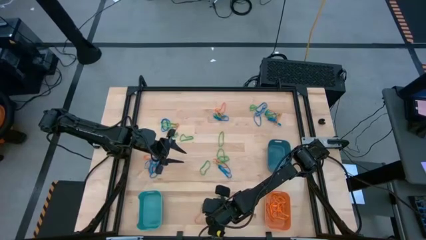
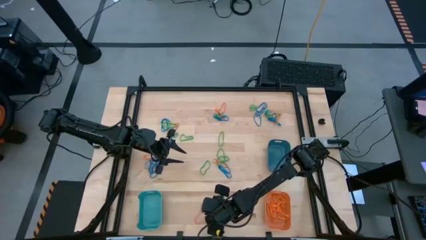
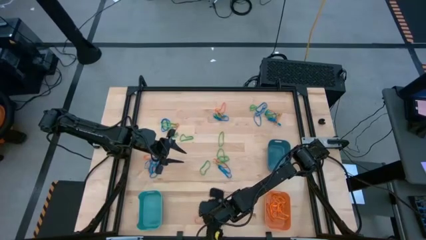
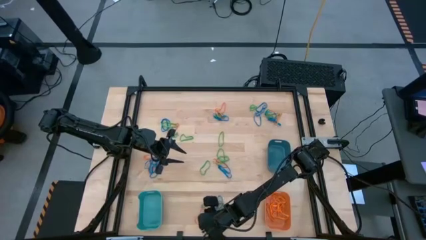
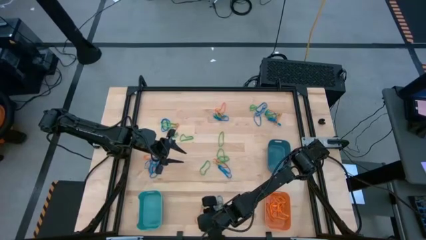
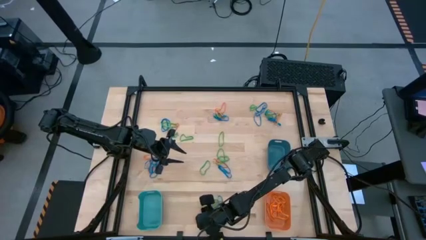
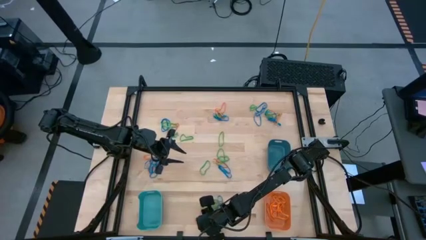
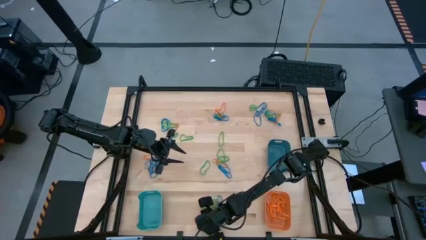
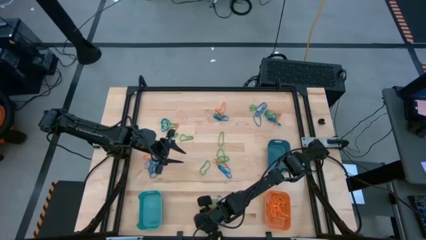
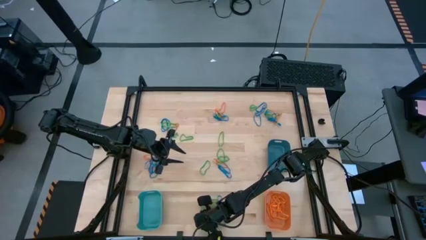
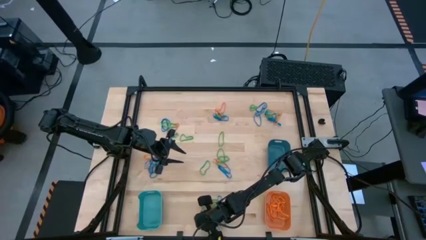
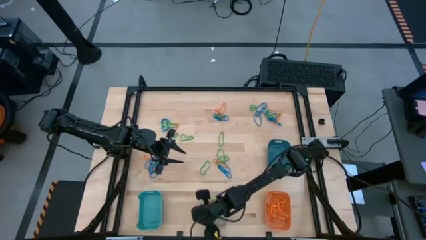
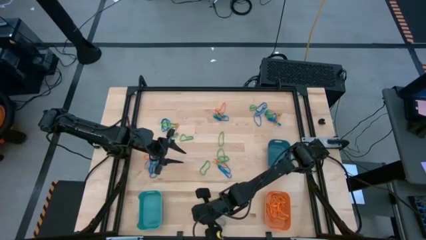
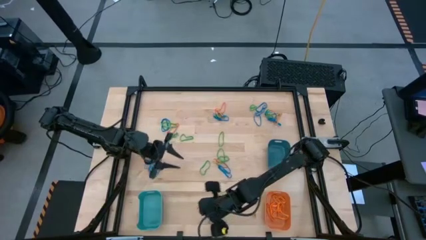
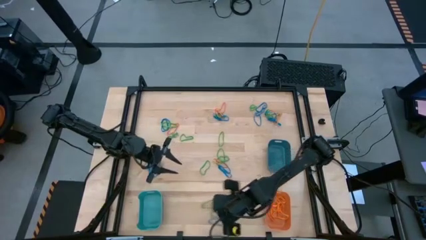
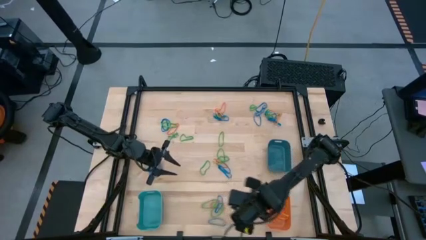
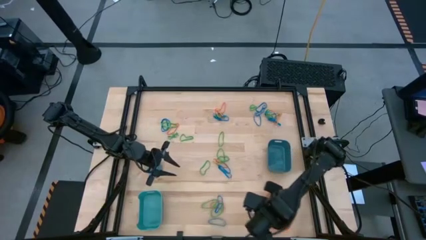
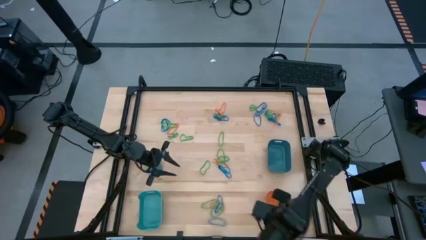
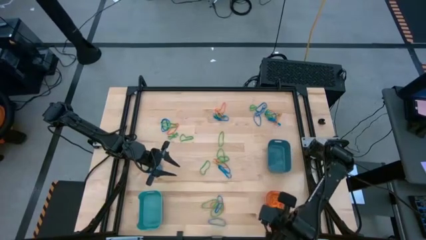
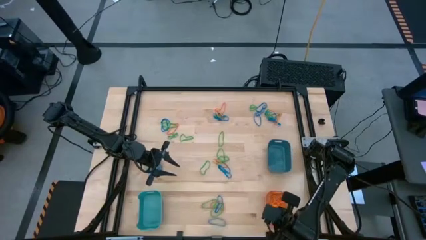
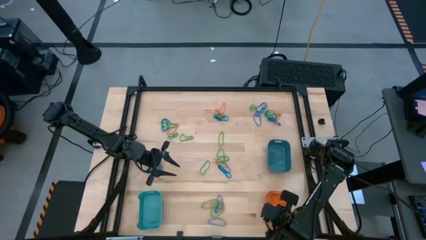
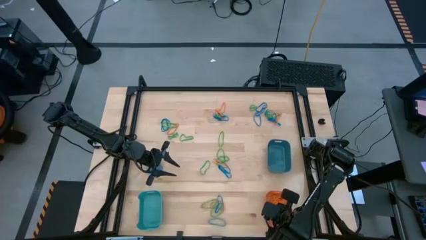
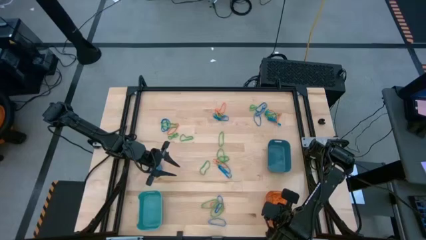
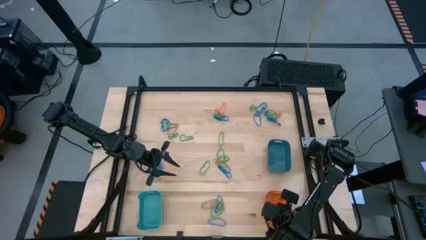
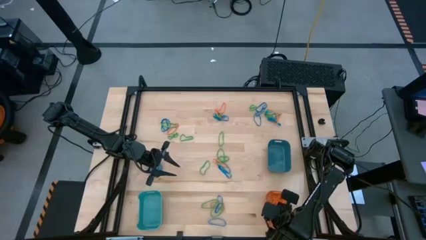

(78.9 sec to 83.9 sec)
Task: Sort rubber bands into baskets
Put the orange rubberband into the orange bin

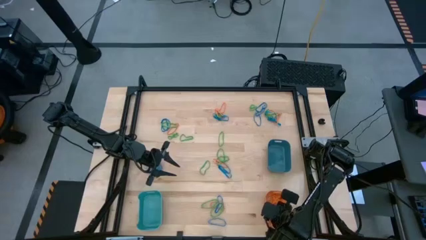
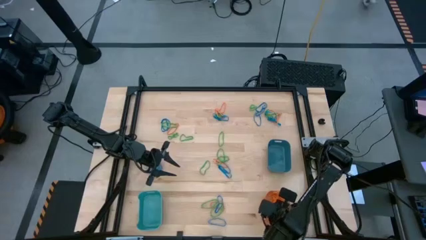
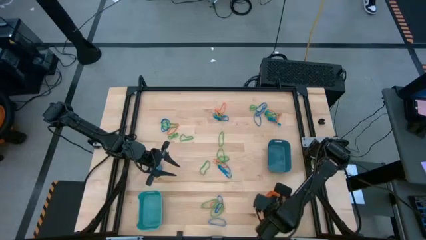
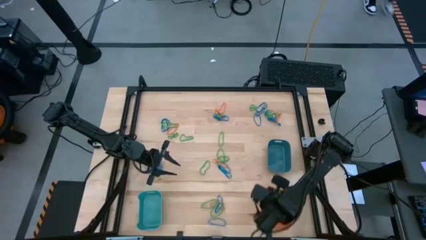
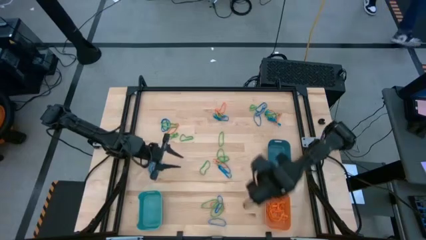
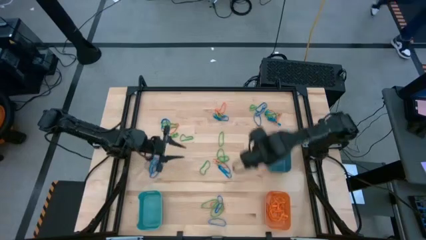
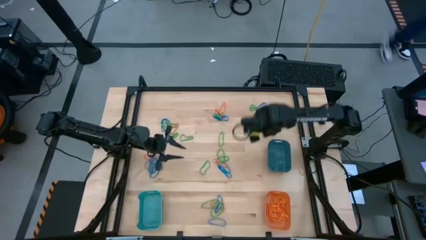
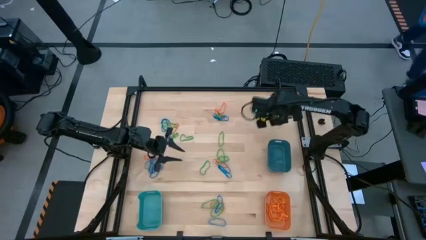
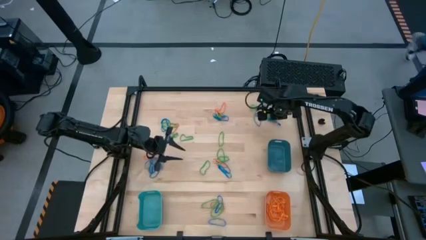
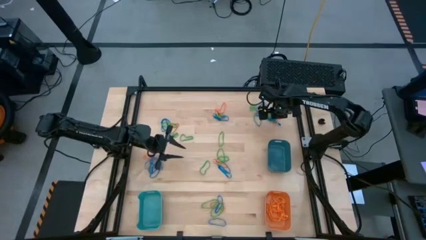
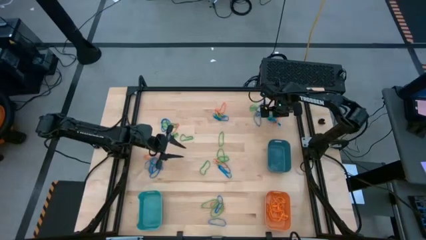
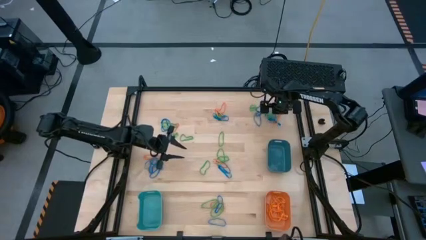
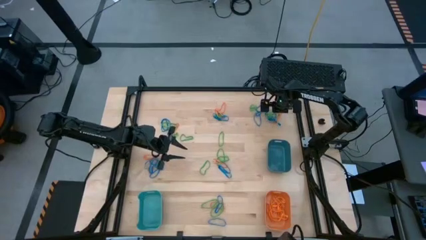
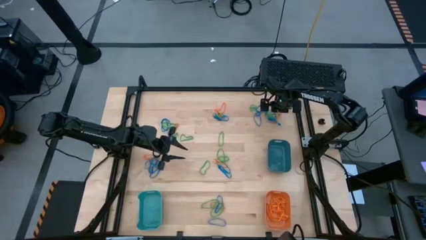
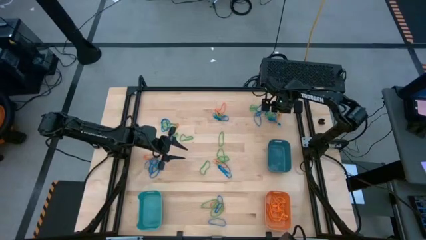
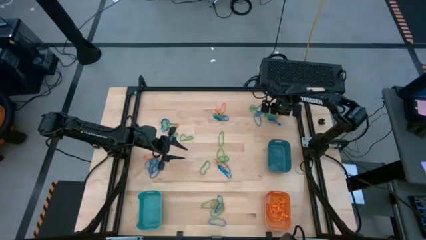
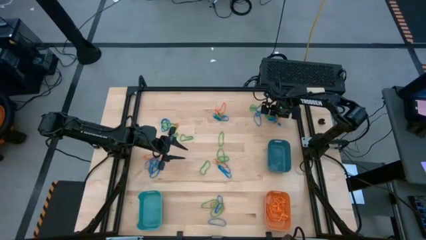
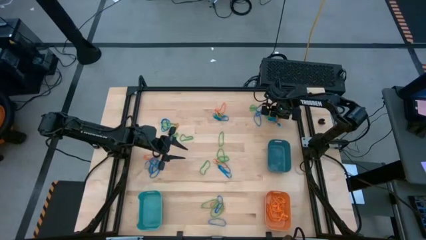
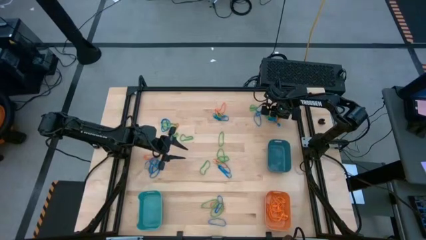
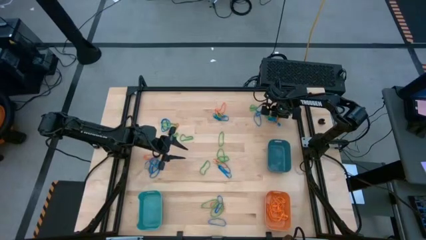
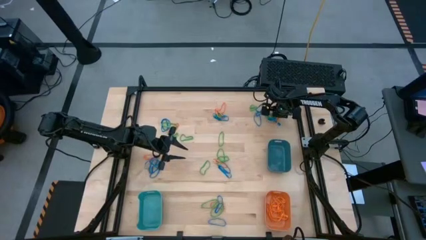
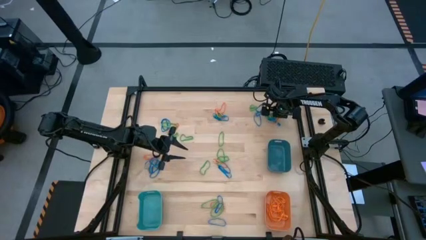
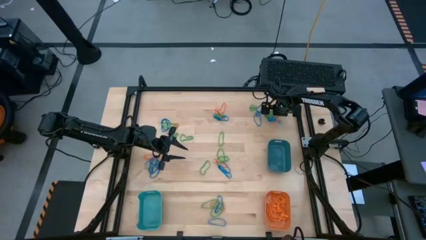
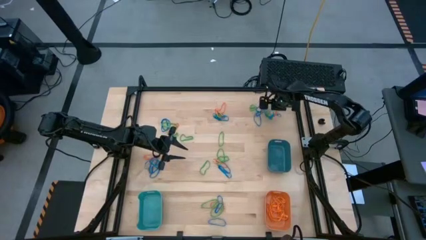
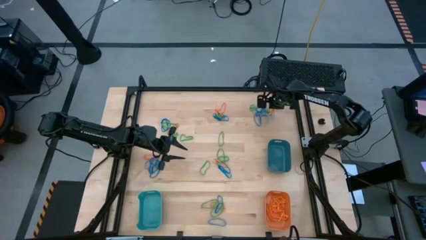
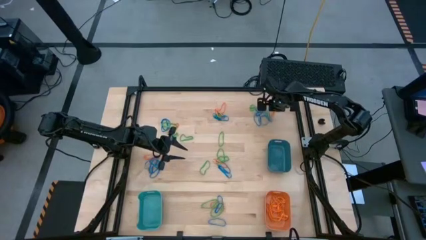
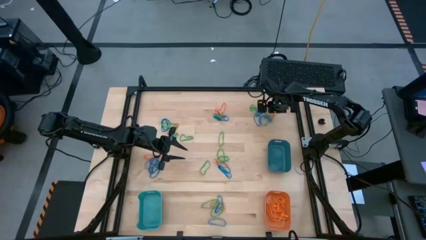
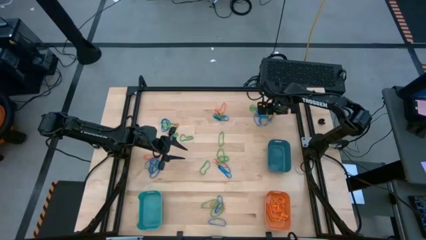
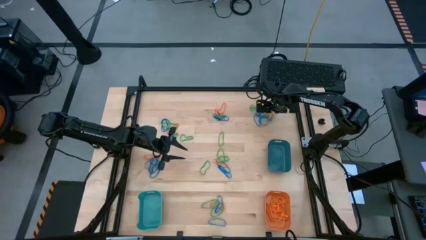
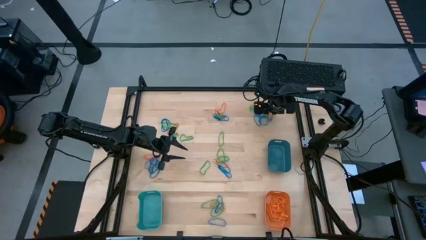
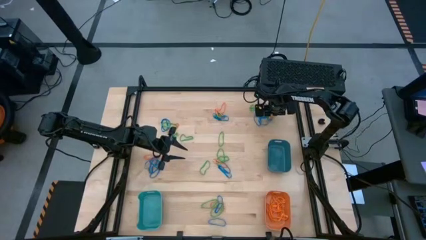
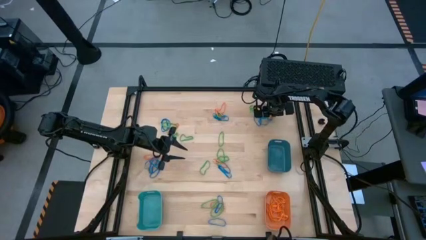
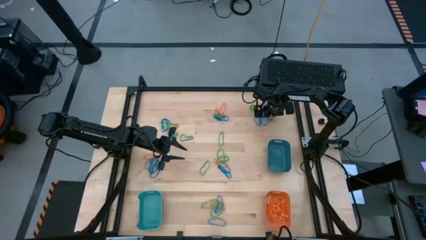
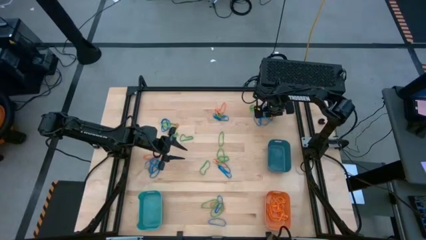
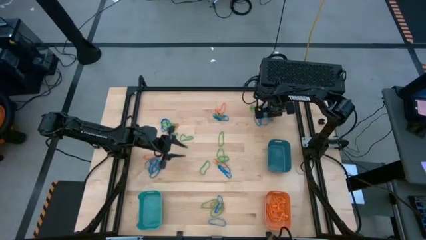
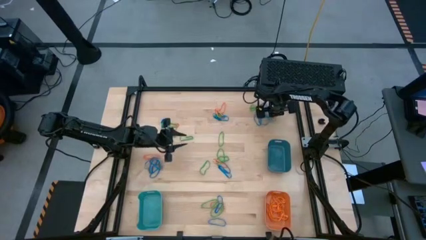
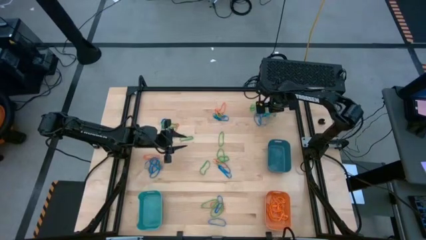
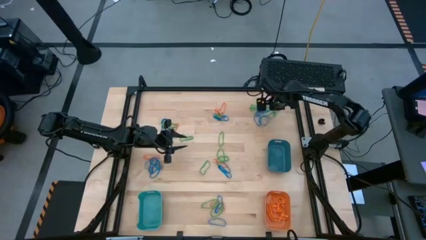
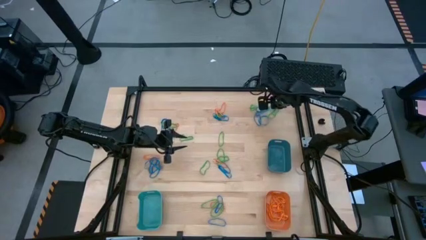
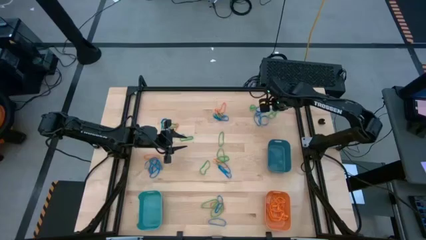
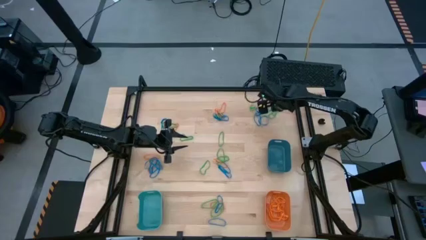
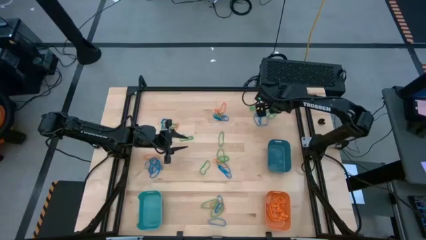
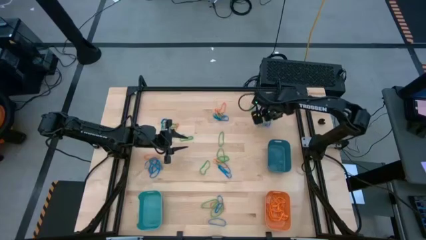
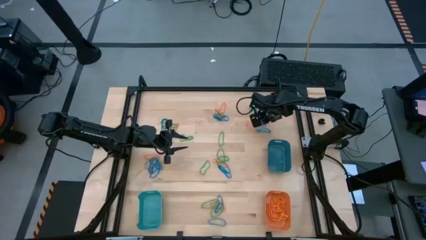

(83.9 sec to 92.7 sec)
Put the orange rubber band into the orange bin

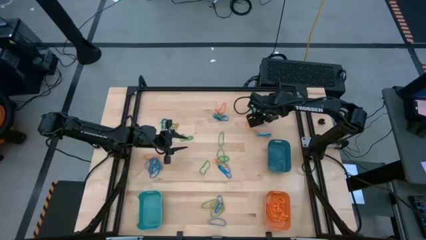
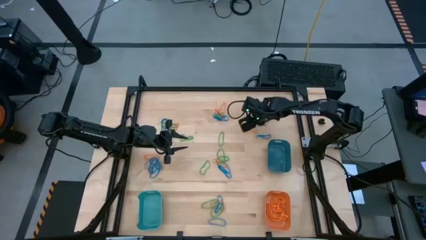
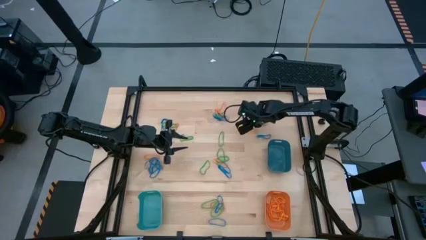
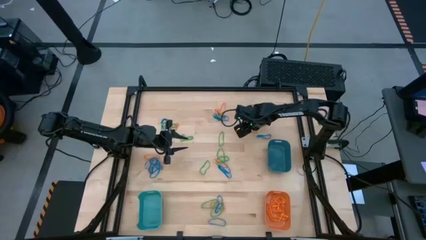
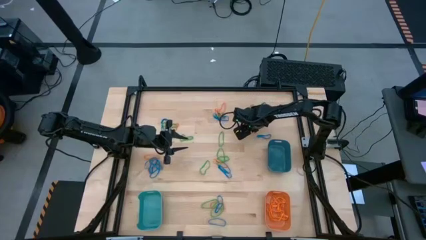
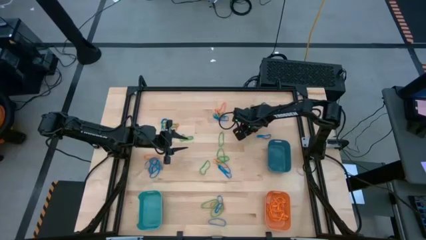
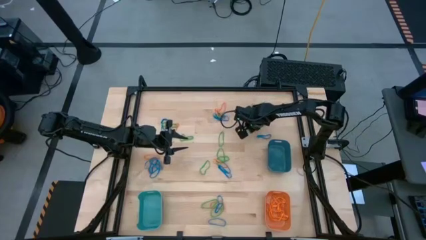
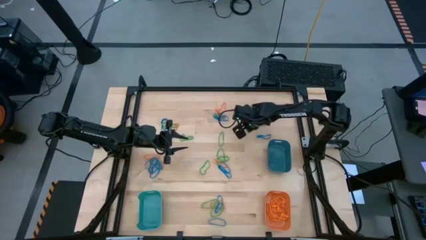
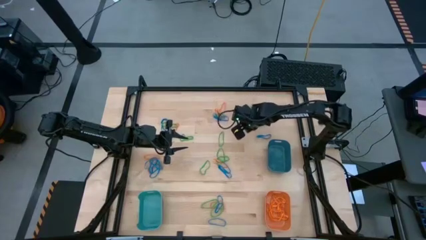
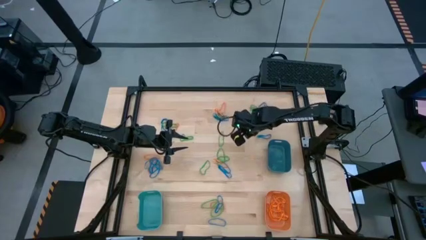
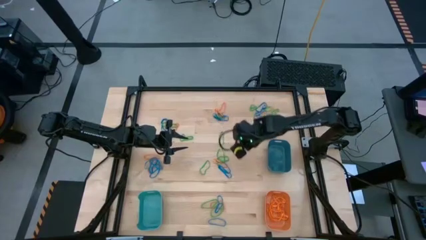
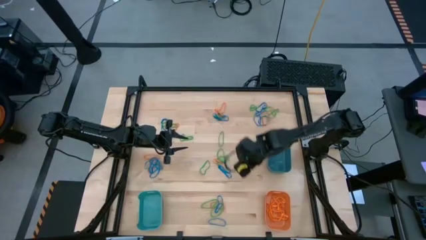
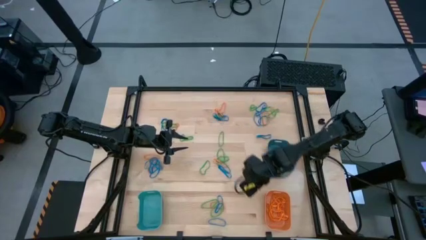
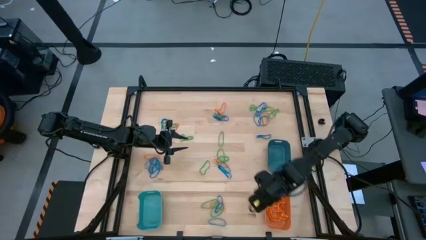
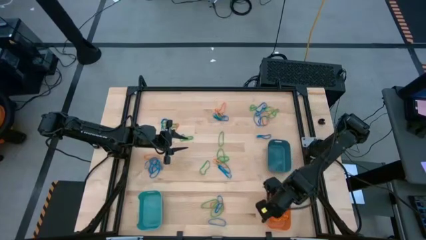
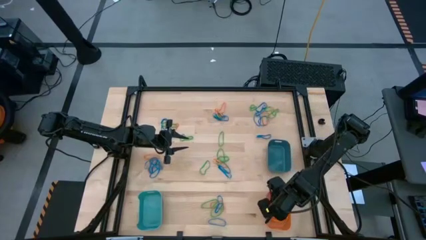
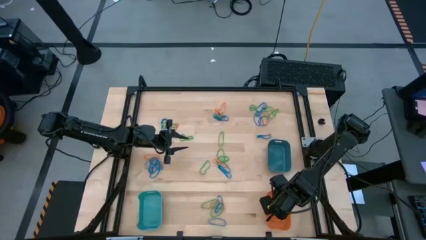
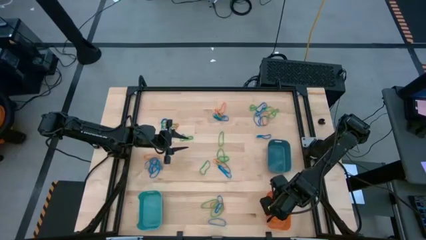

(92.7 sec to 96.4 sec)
Put the orange rubber band into the orange bin
